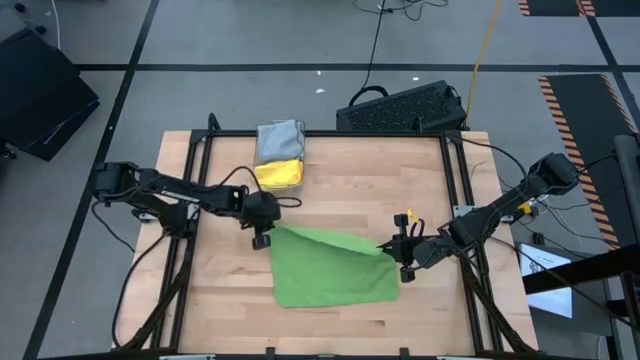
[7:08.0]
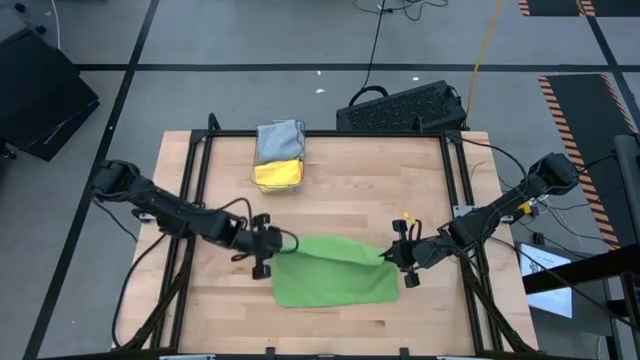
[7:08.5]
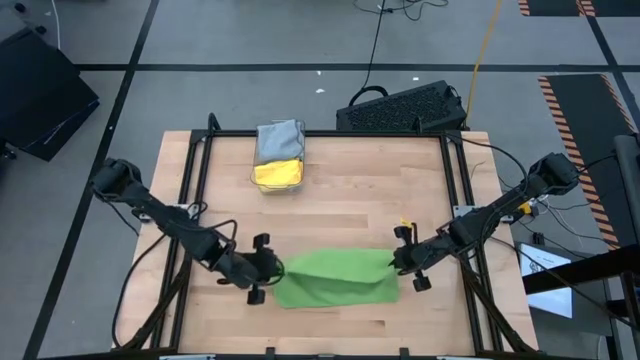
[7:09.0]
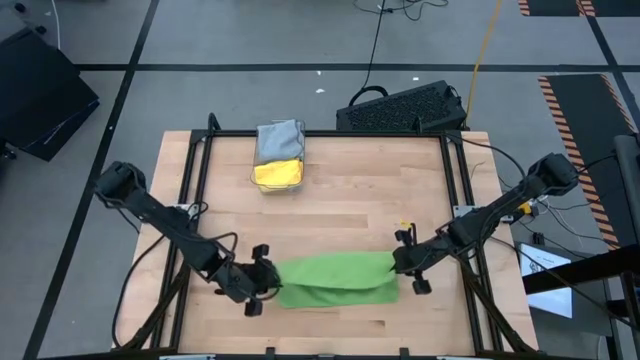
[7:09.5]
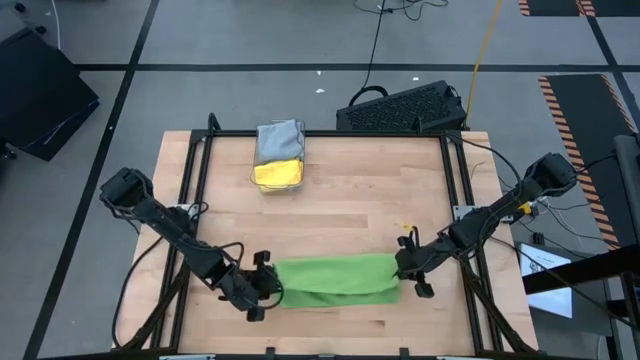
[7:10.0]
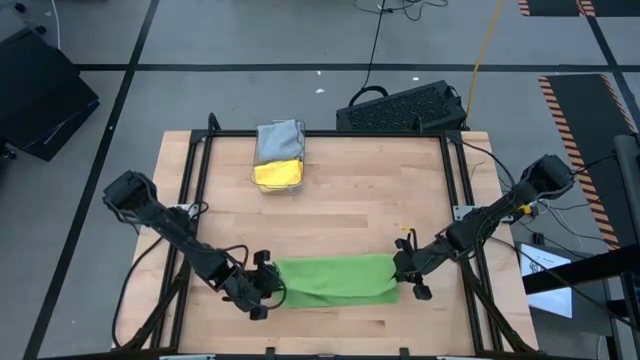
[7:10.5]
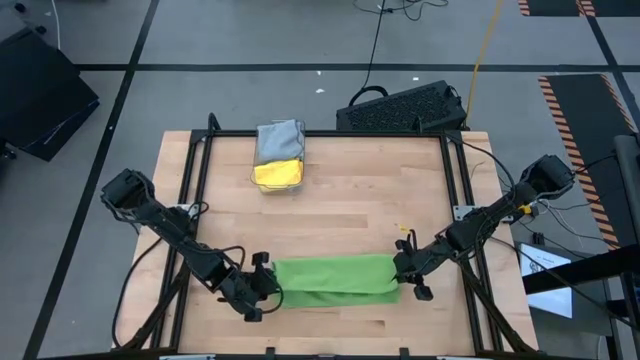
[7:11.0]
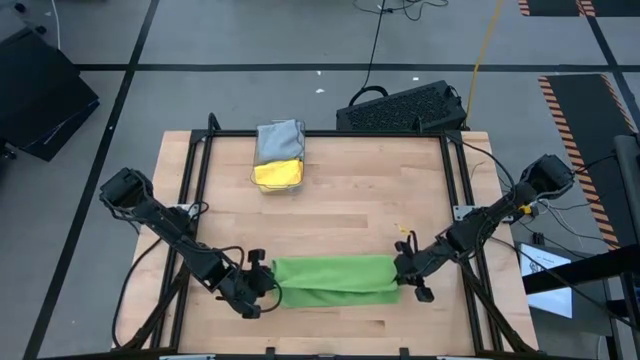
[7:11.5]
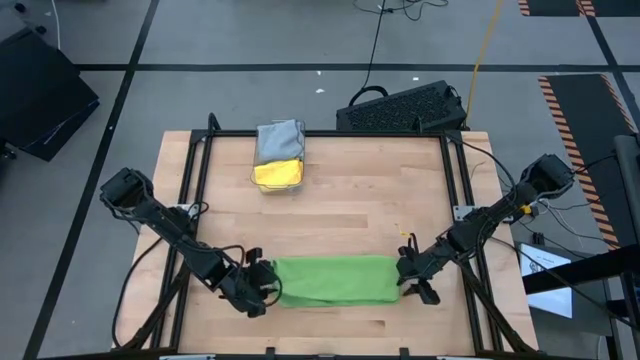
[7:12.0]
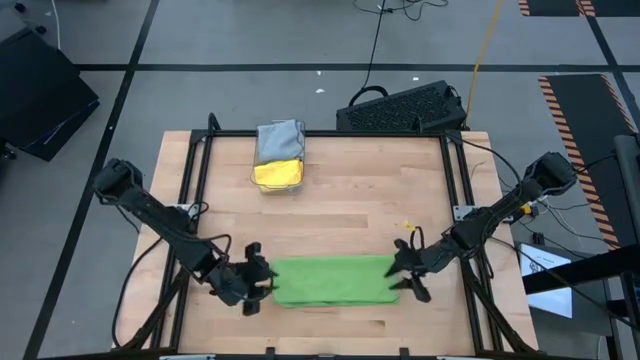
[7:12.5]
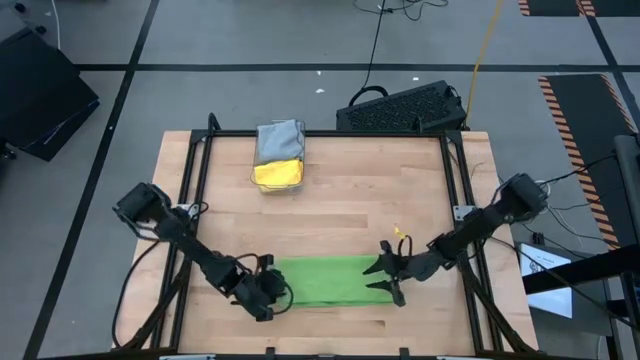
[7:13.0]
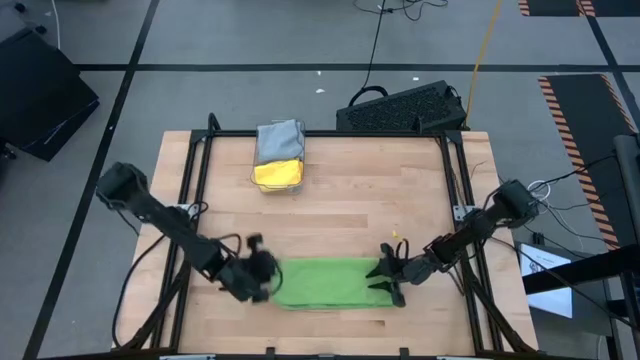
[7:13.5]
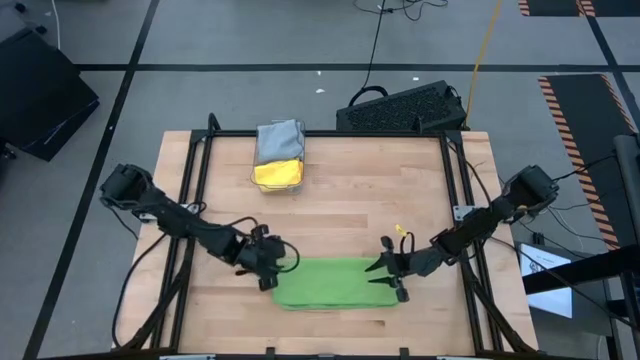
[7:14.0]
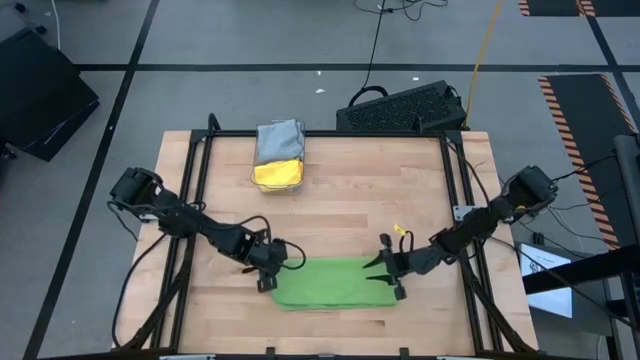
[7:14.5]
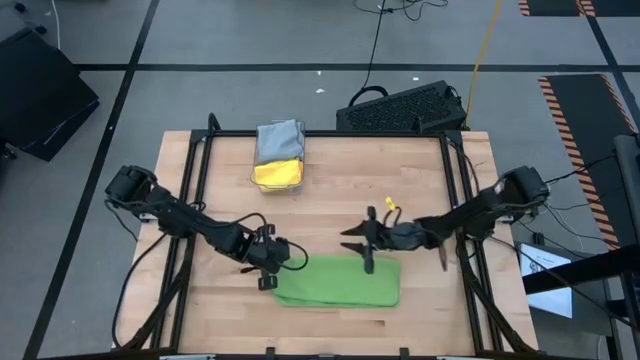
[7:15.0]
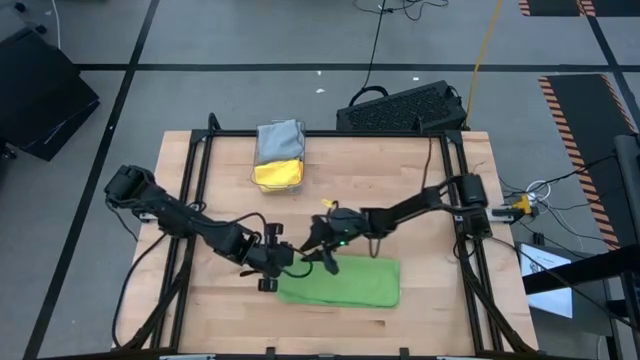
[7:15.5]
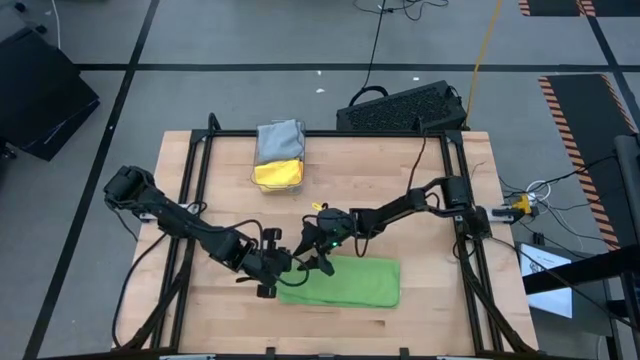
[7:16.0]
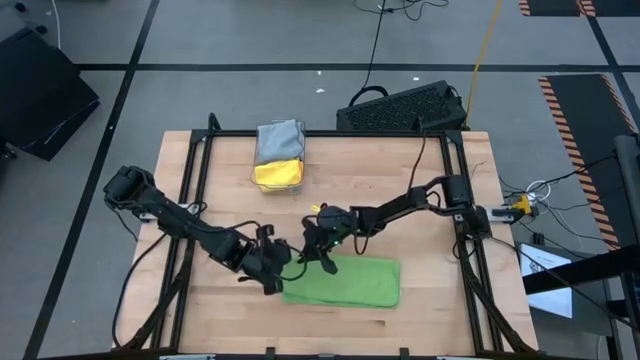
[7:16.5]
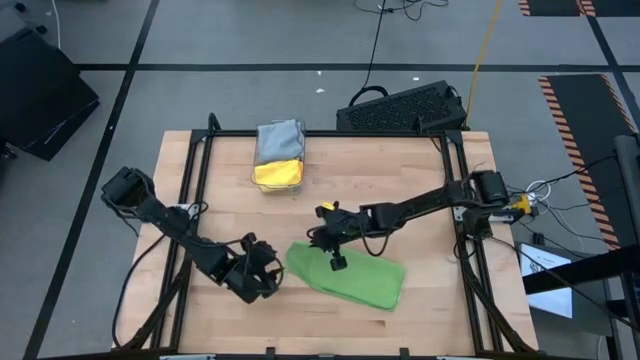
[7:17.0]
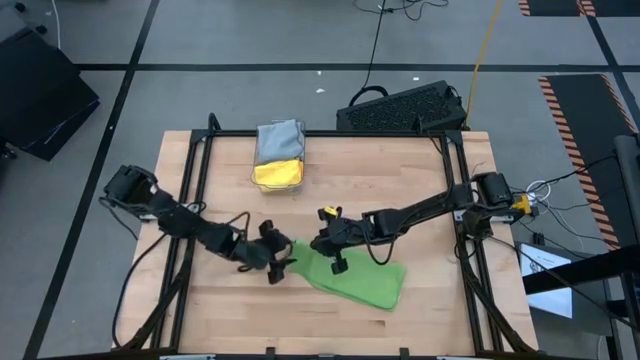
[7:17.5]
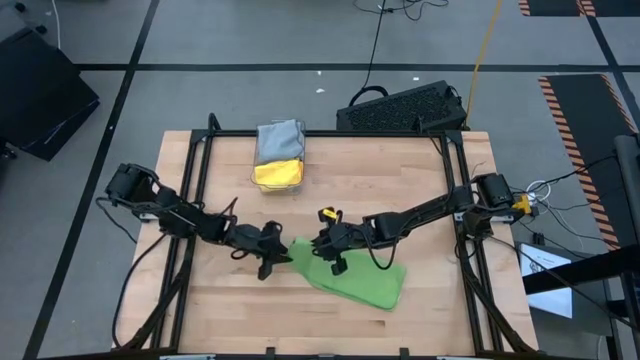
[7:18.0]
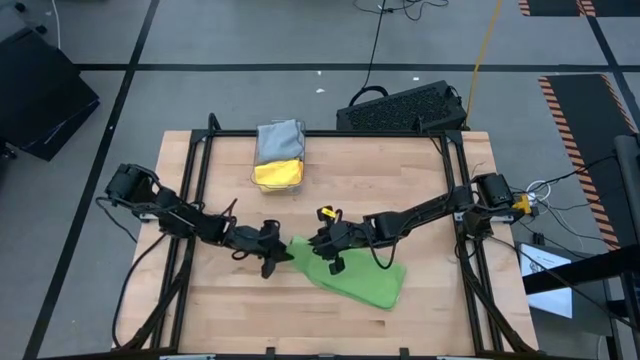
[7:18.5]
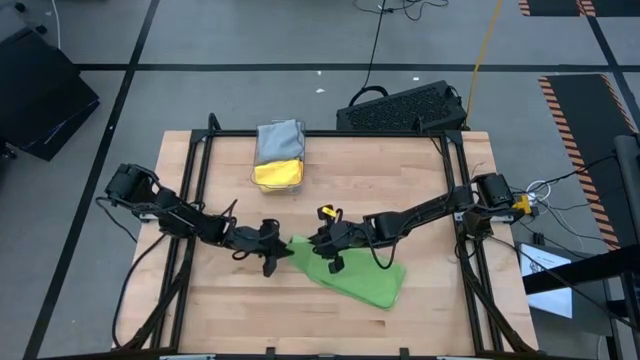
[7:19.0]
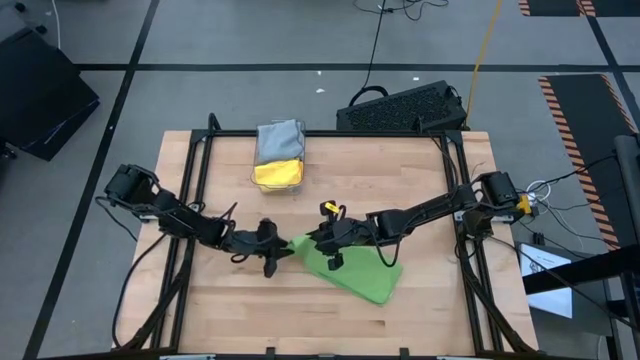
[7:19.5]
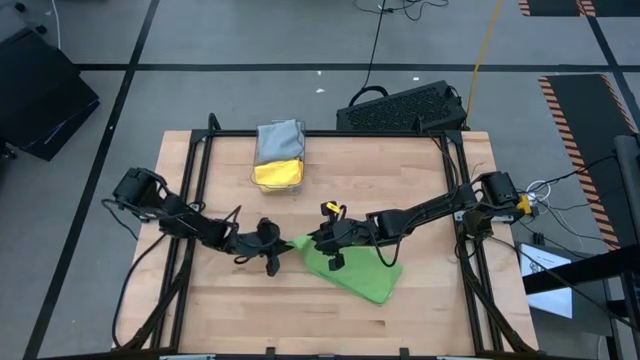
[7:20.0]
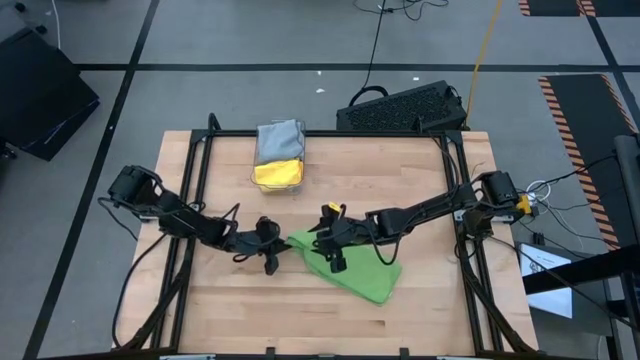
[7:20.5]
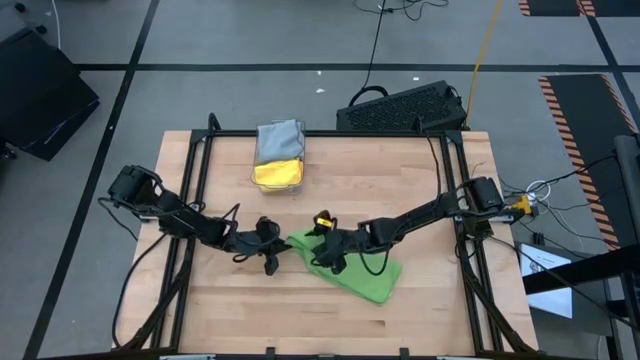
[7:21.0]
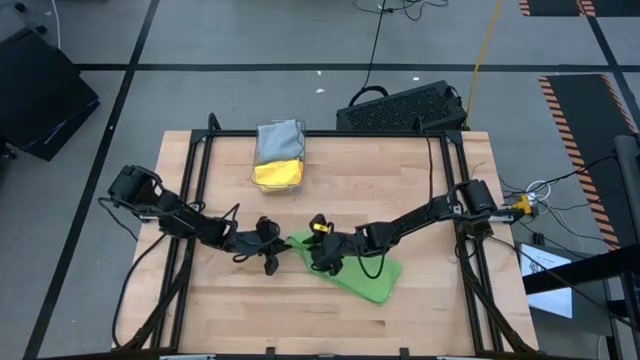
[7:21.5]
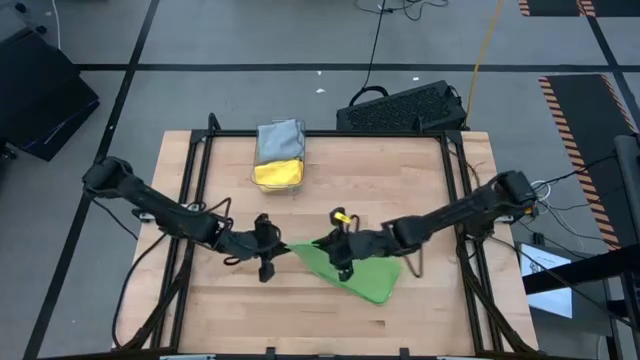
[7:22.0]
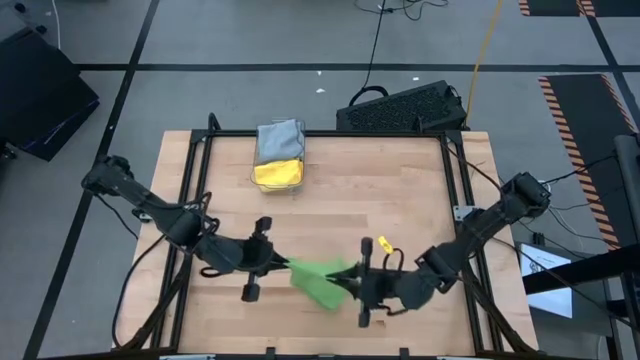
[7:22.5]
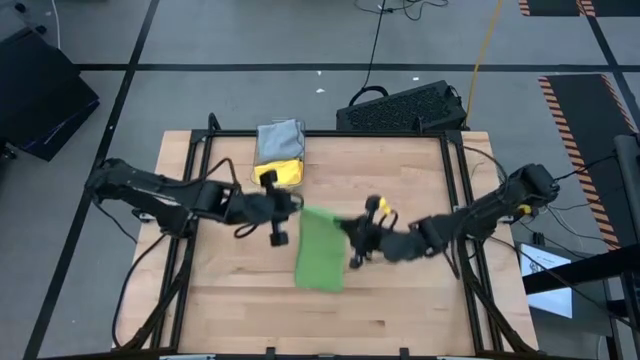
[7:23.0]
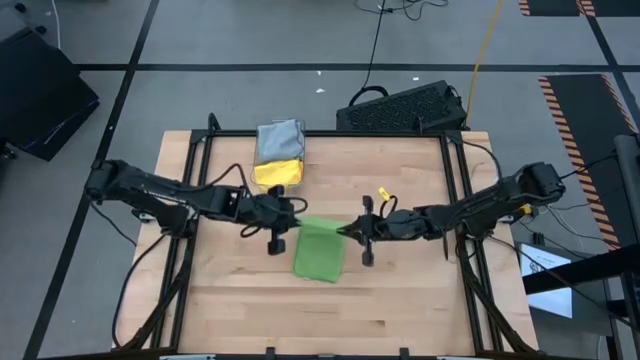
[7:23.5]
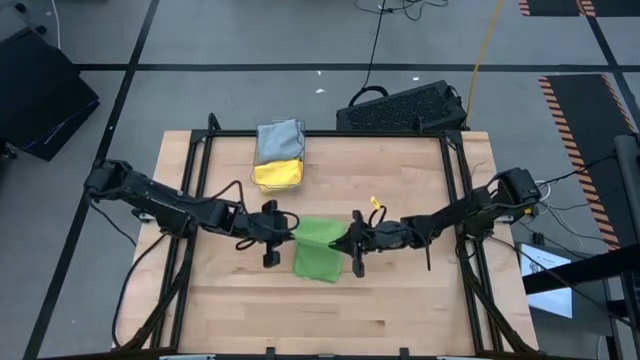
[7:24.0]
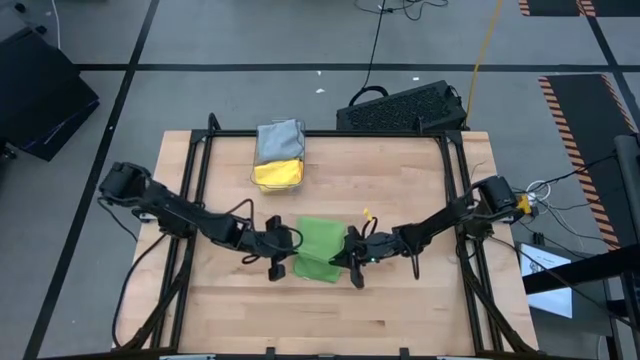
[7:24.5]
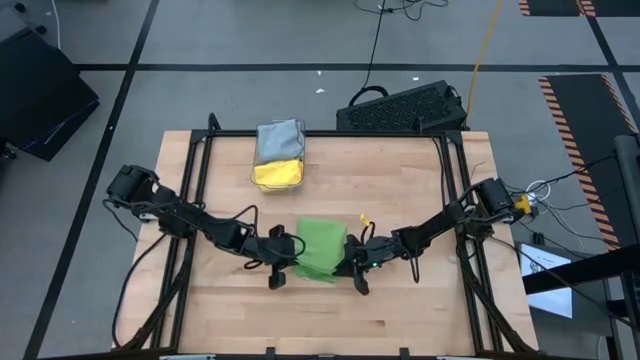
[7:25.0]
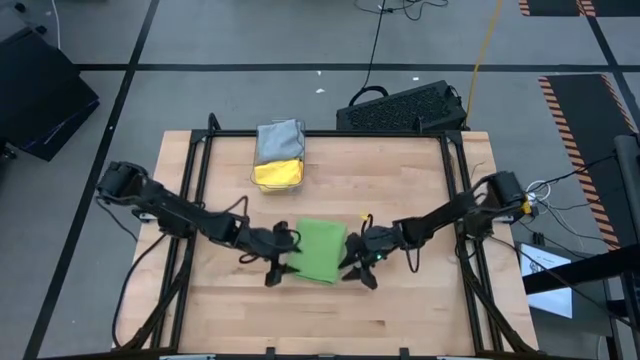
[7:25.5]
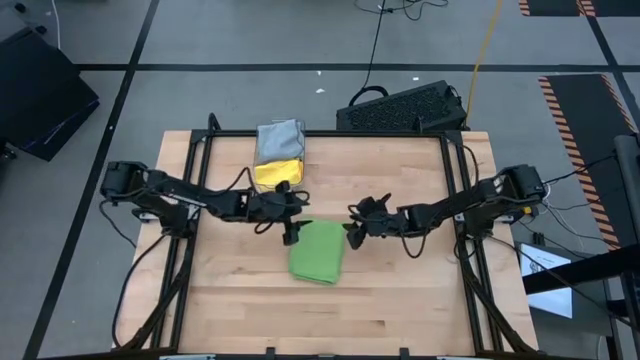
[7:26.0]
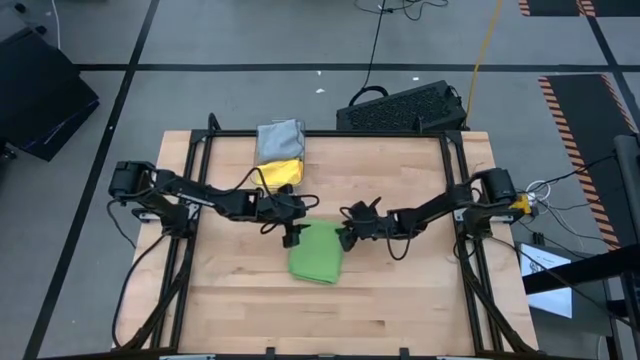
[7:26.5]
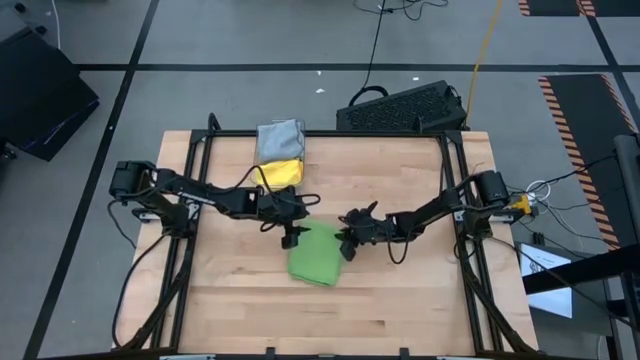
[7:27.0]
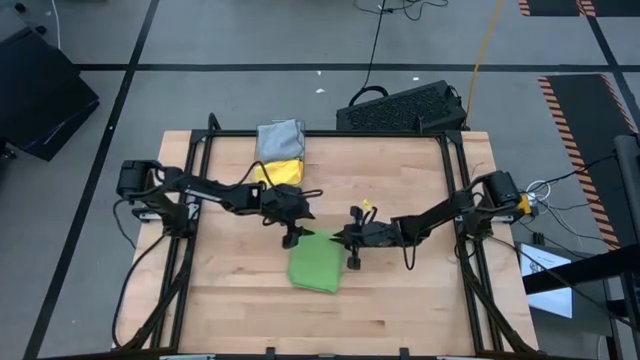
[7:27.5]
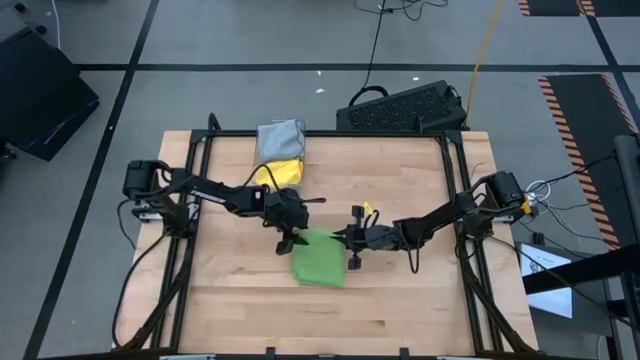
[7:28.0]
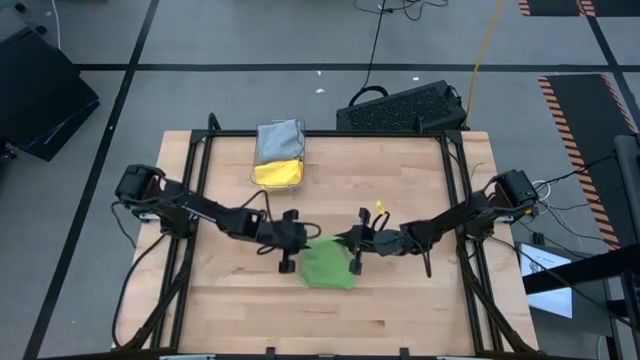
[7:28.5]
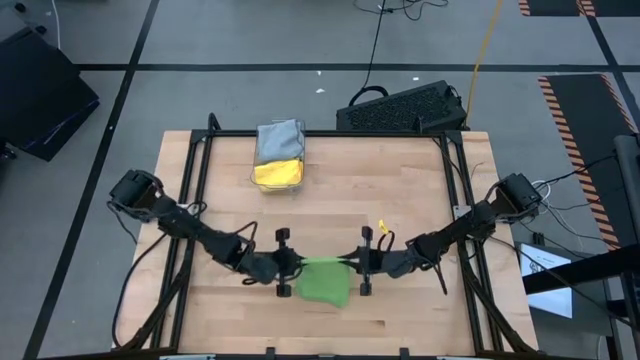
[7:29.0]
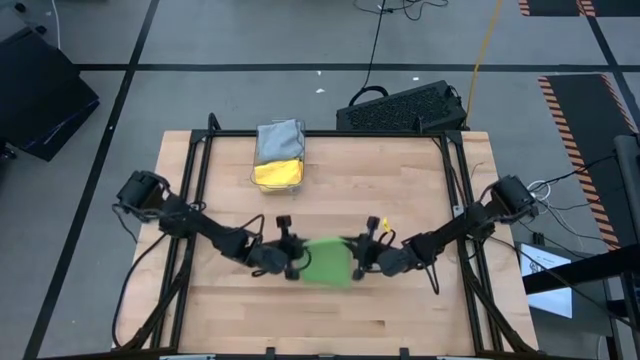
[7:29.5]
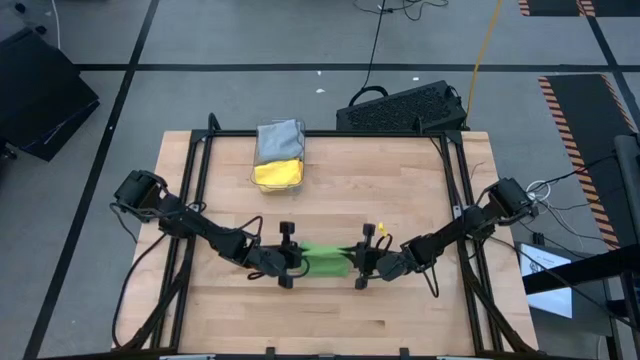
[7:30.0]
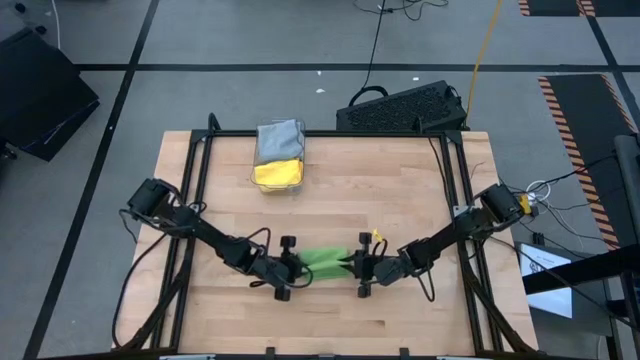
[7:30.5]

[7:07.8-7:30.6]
Task: Fold microfiber towels
Fold the green towel on the table
